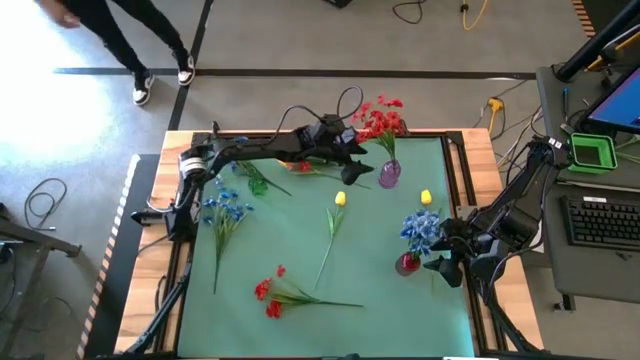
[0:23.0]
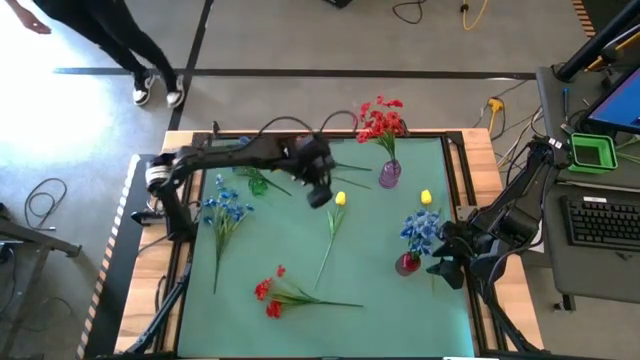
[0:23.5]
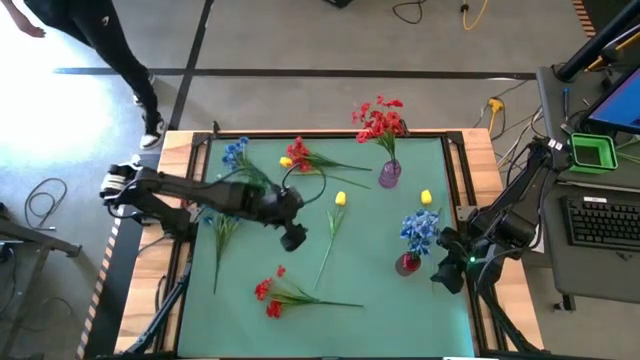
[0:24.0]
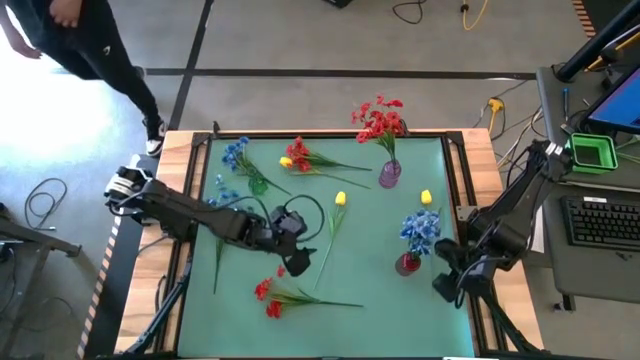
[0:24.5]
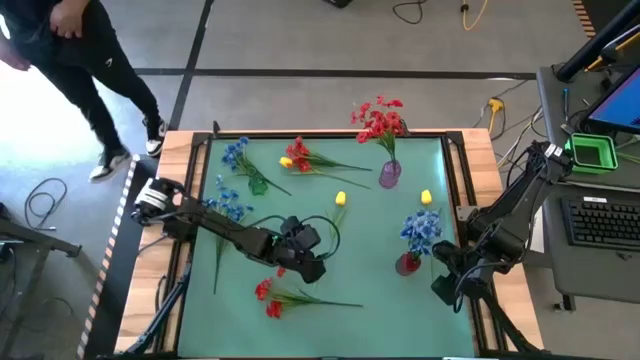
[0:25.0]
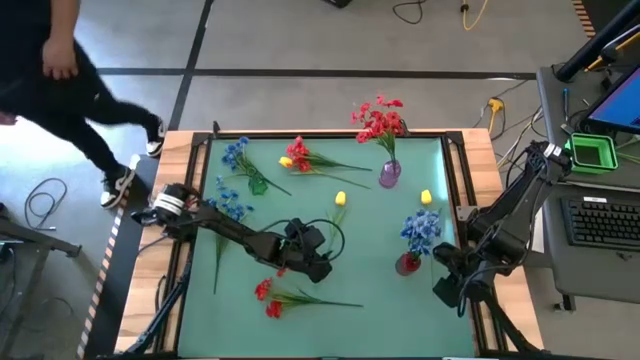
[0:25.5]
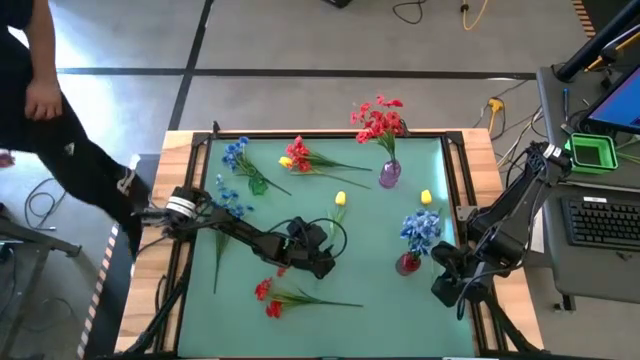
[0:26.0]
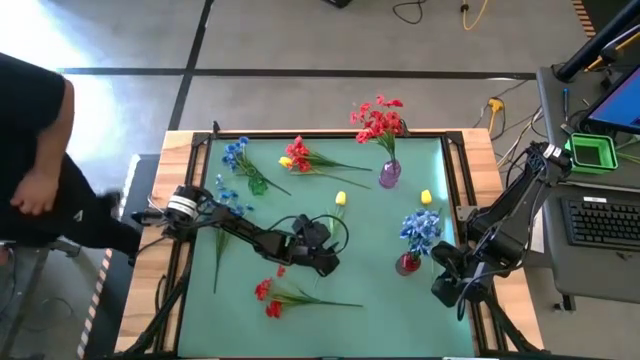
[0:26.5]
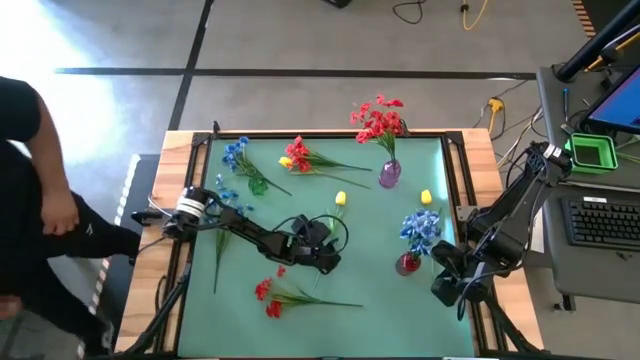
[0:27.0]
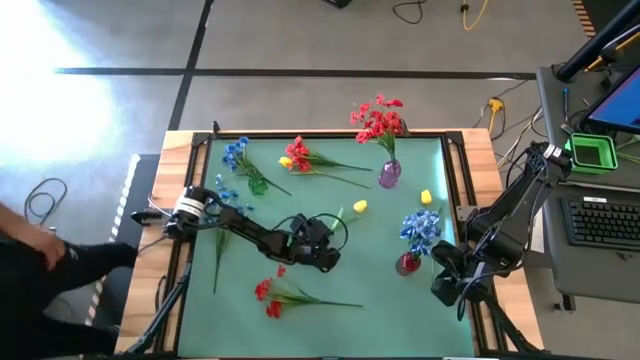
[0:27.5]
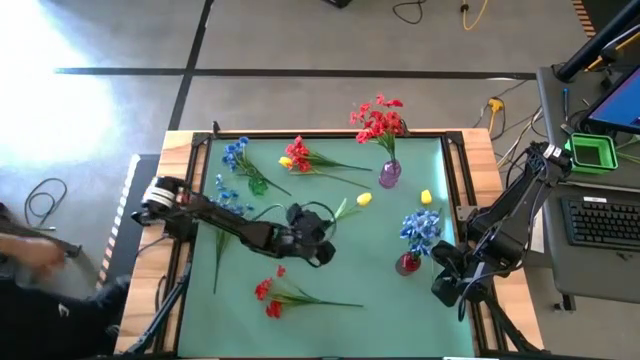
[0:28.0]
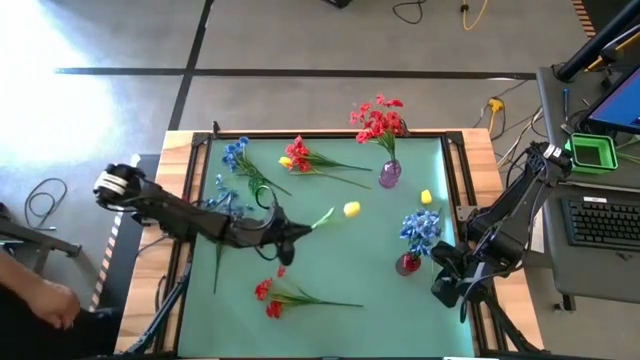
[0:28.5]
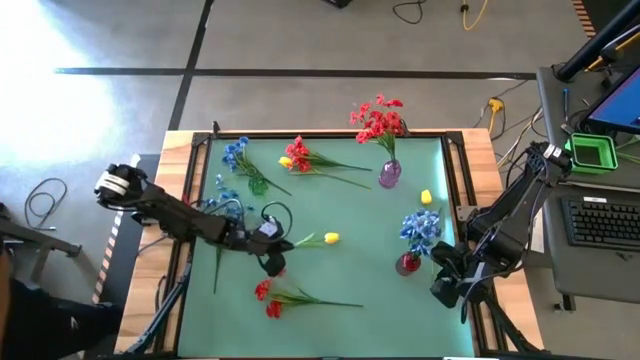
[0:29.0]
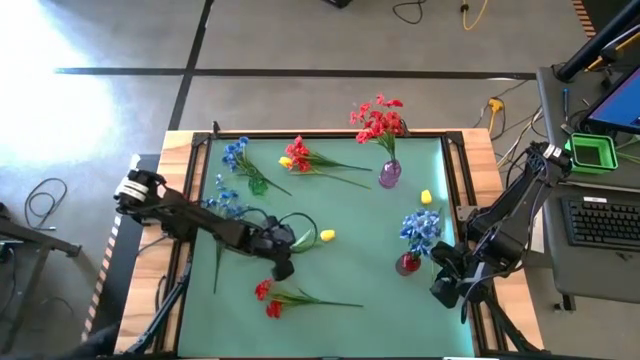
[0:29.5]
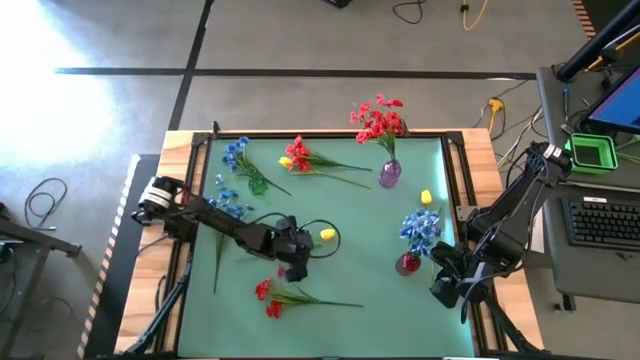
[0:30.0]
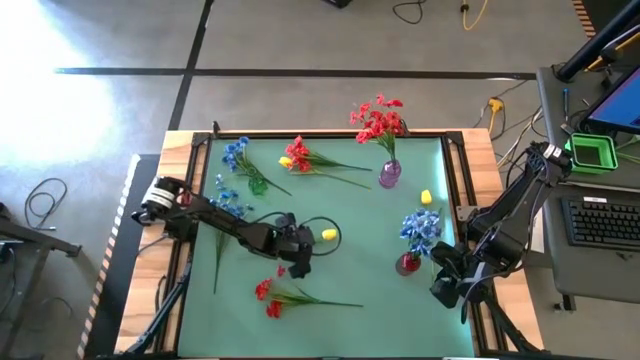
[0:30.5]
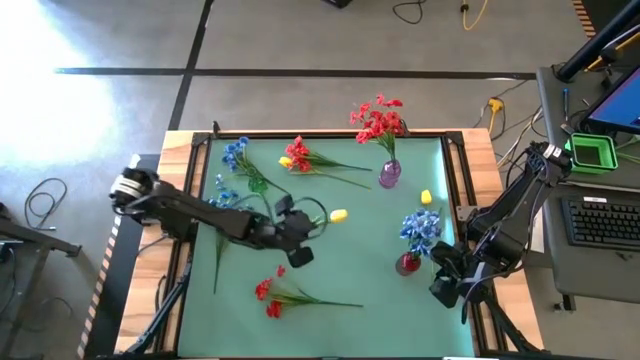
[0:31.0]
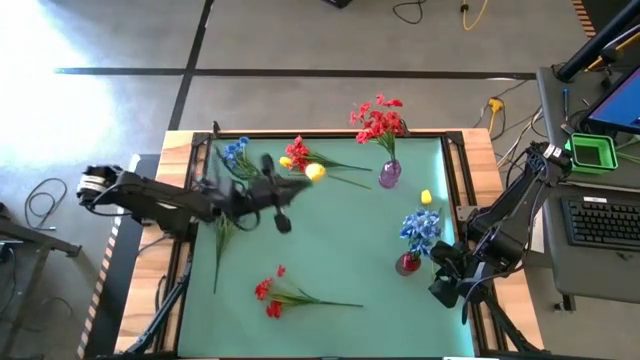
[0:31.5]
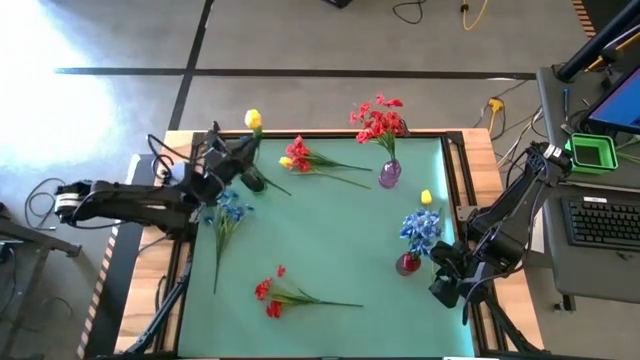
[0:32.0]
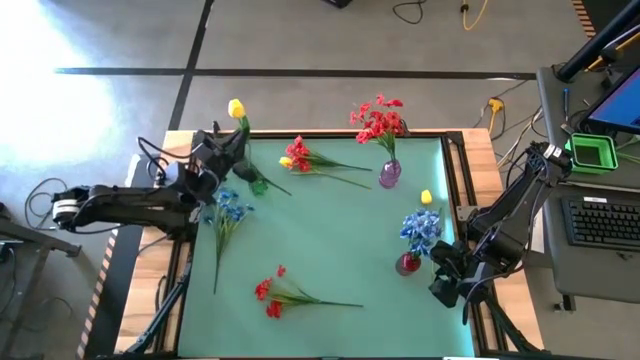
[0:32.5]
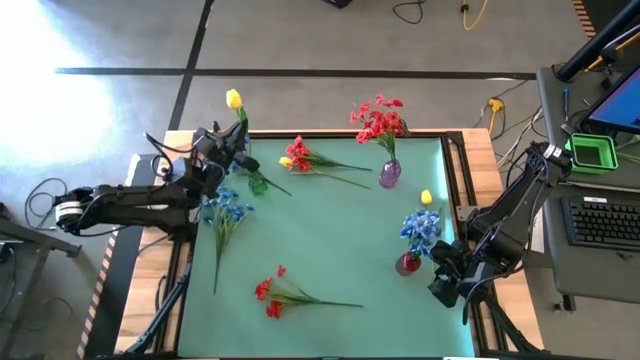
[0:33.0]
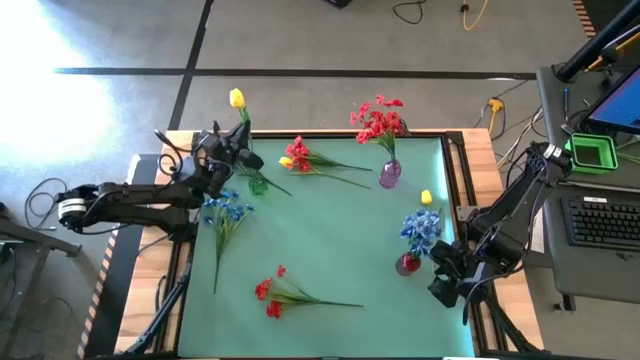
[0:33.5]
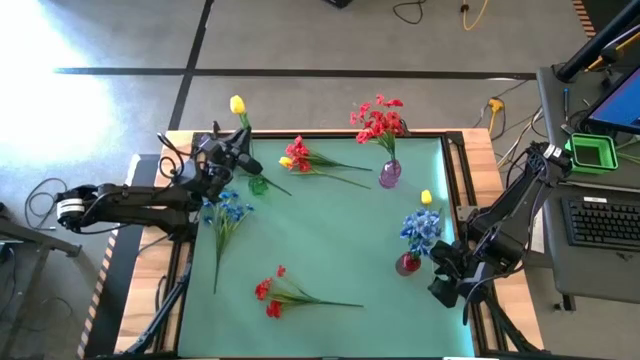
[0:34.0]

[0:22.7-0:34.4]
Task: Sort flowers into vase by color
Put the bottom left yellow tulip into the green vase

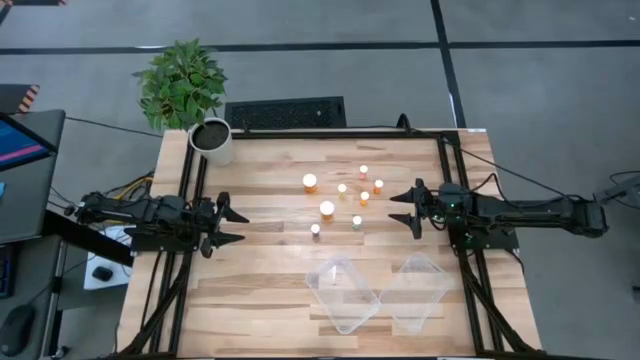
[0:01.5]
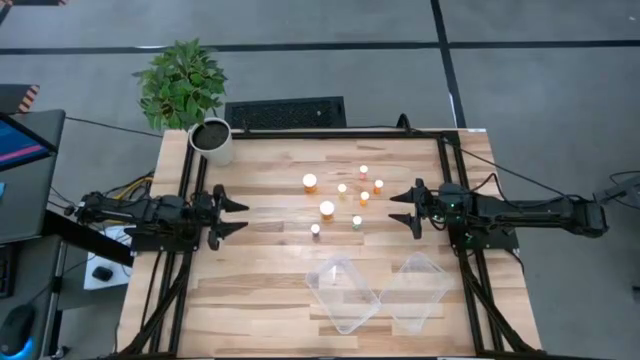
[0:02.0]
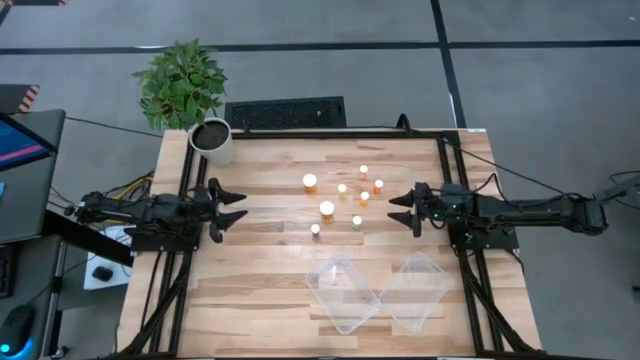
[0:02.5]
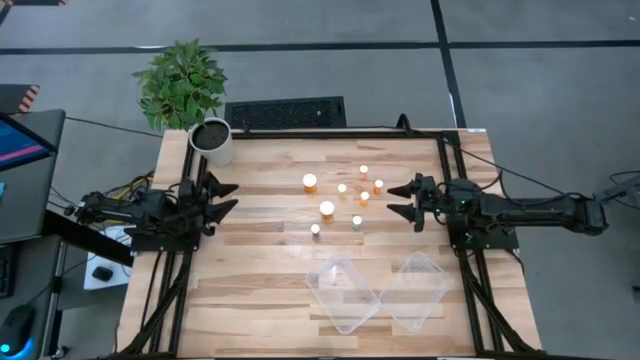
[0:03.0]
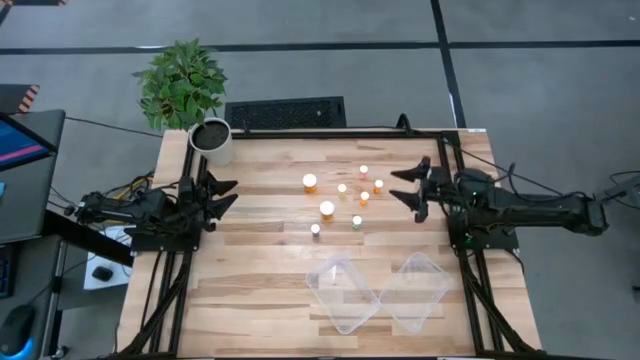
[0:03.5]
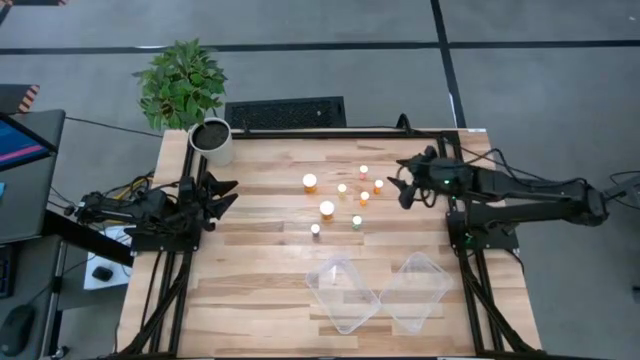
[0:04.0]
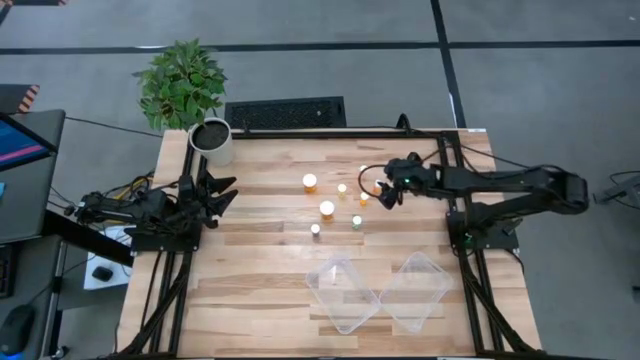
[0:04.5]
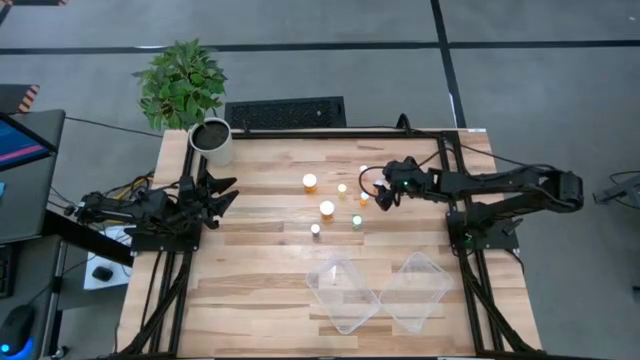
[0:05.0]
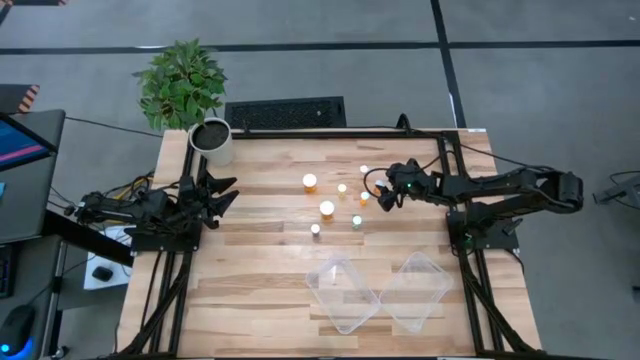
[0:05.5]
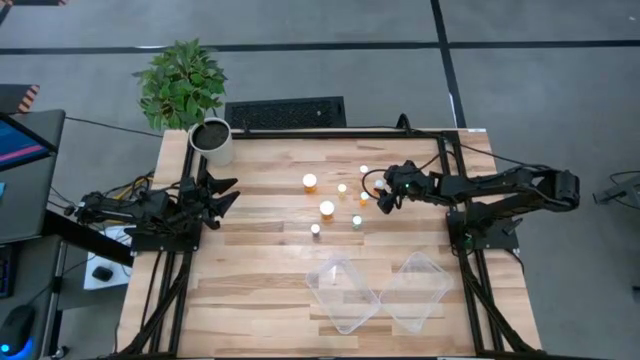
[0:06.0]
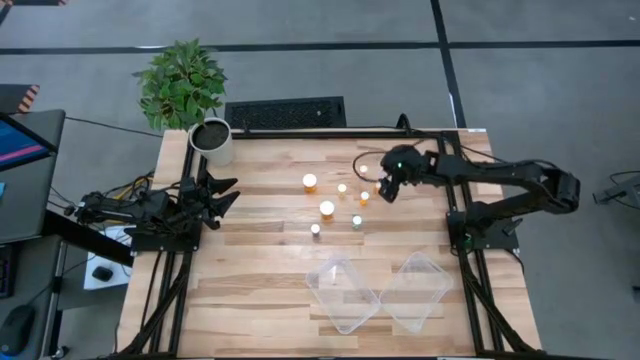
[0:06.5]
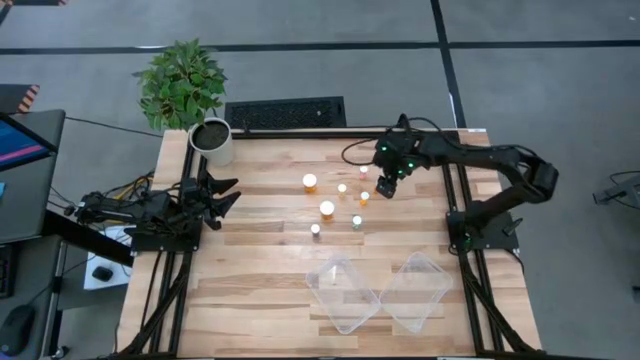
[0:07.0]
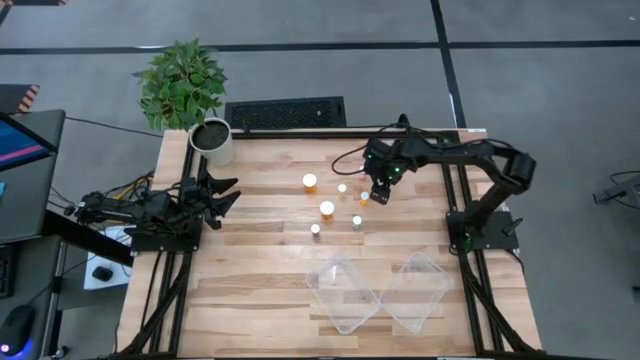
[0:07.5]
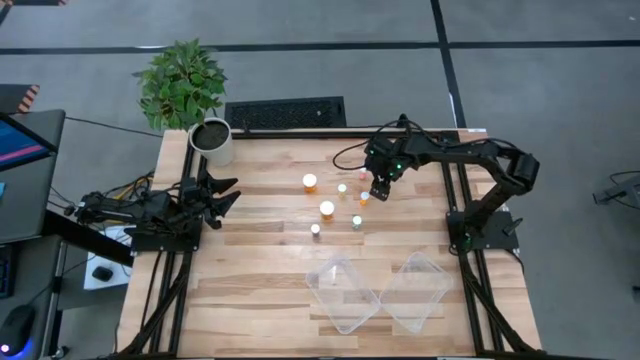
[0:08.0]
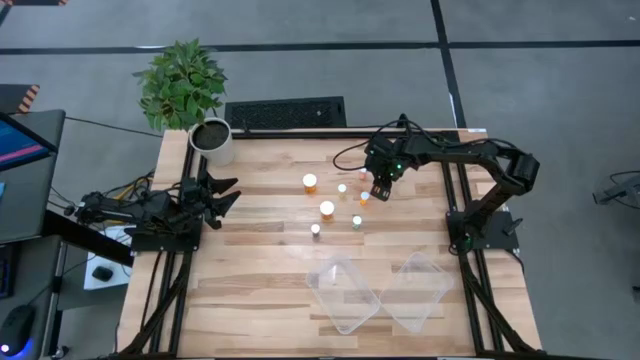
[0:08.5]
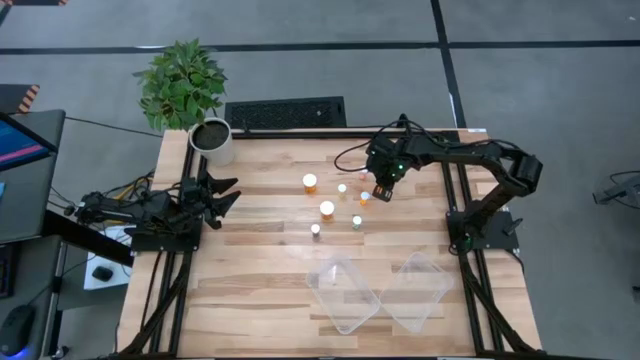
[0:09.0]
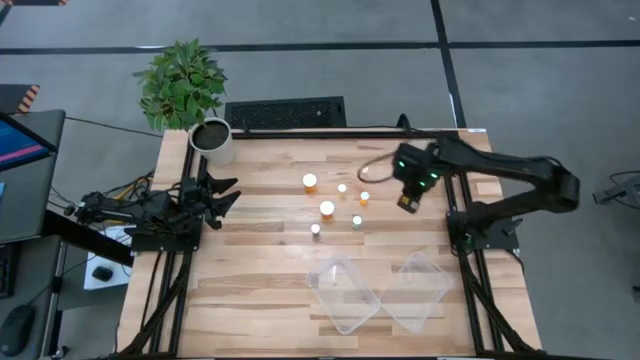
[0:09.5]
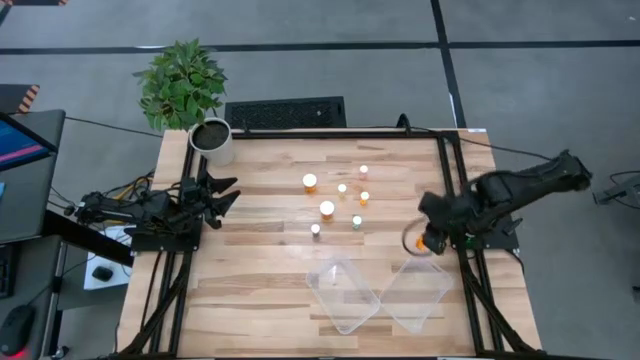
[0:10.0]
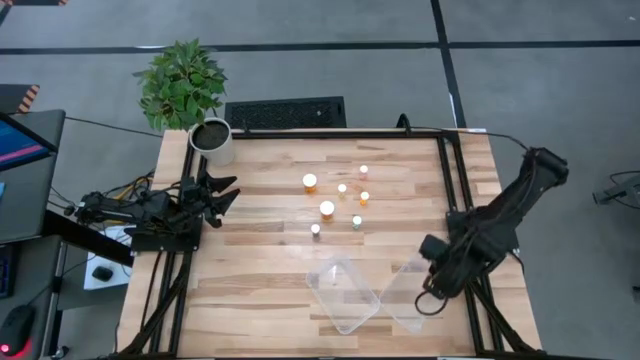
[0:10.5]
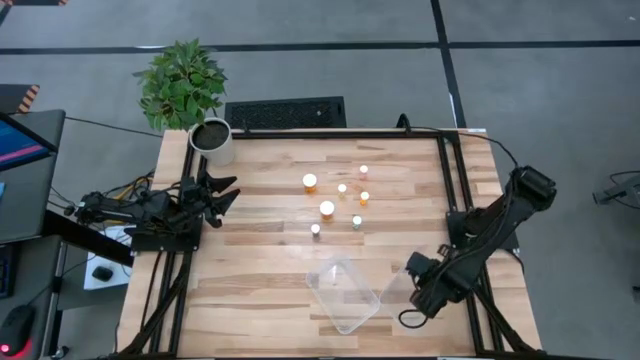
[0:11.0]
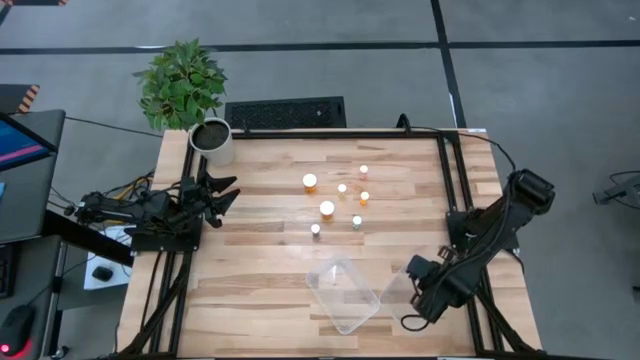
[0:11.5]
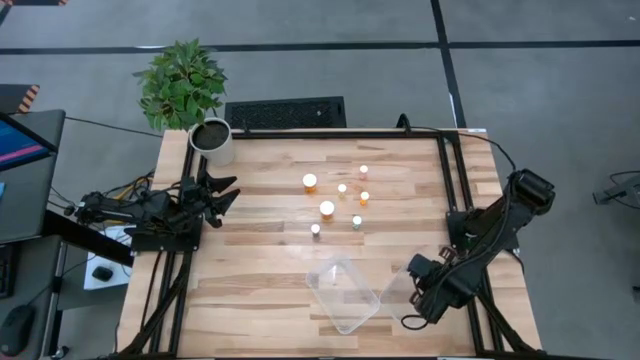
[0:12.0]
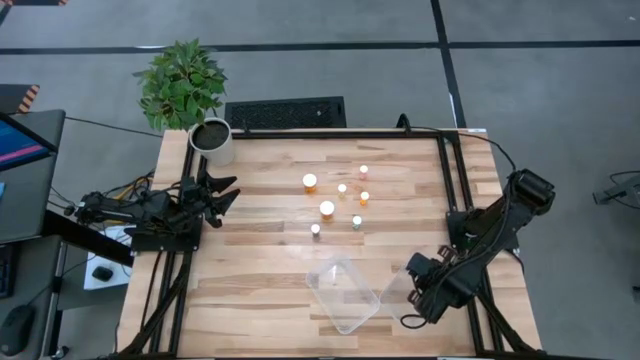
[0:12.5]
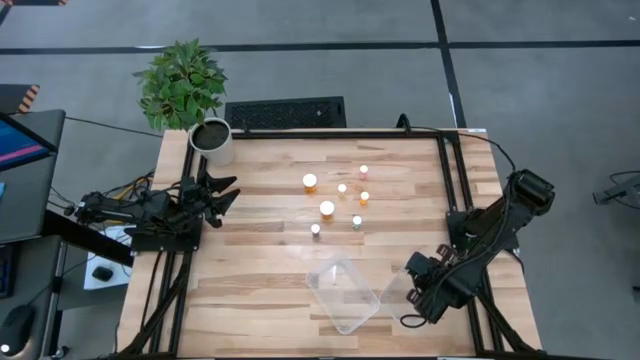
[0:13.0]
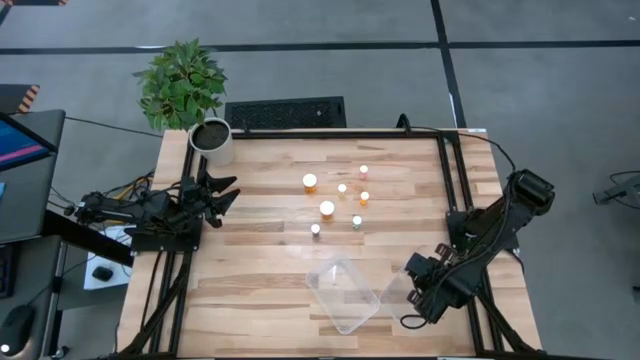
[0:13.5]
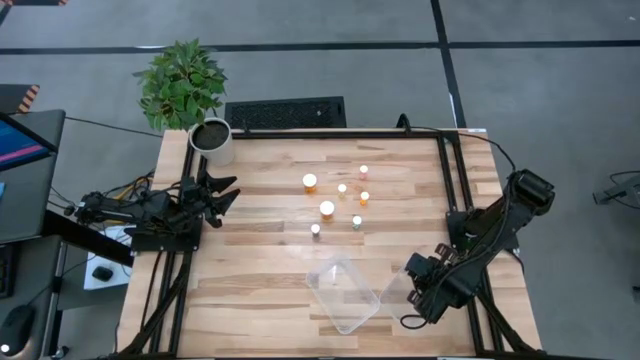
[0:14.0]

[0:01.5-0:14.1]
Task: Pick and place medicine bottles into bin by pill shape (circle, oval)
Put the top right orange pill bottle into the right transparent bin
